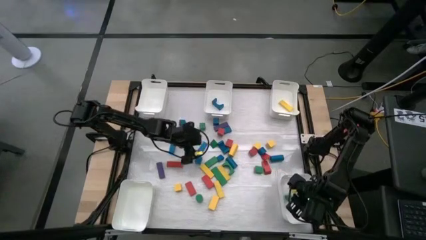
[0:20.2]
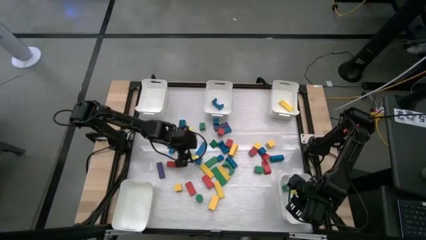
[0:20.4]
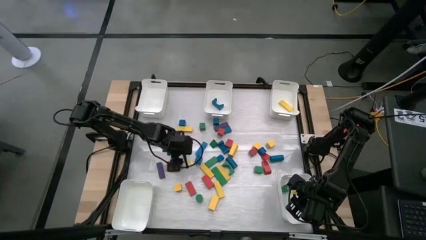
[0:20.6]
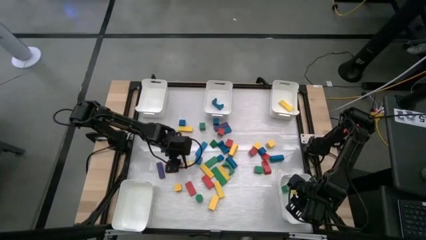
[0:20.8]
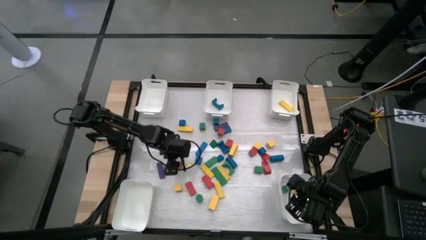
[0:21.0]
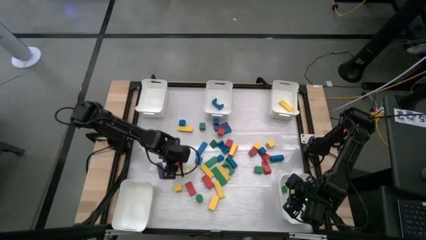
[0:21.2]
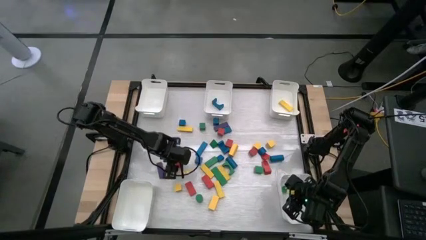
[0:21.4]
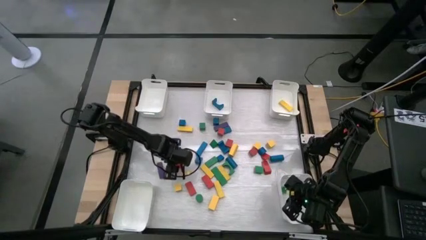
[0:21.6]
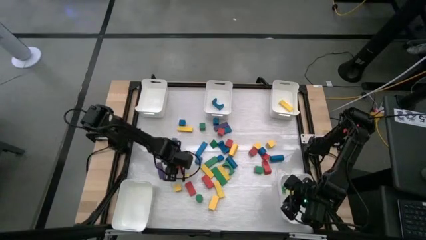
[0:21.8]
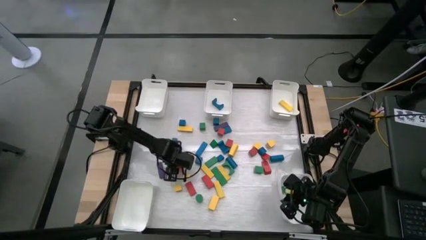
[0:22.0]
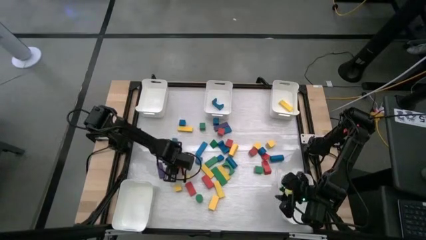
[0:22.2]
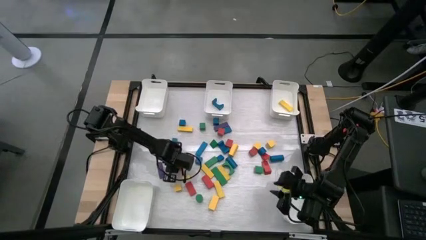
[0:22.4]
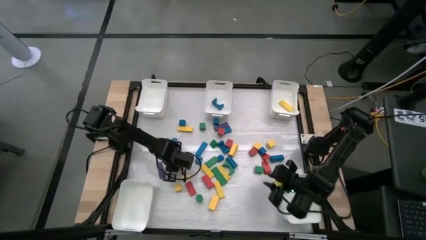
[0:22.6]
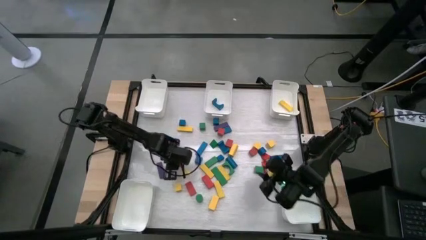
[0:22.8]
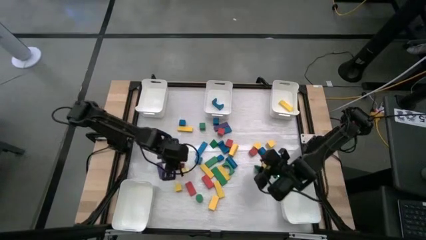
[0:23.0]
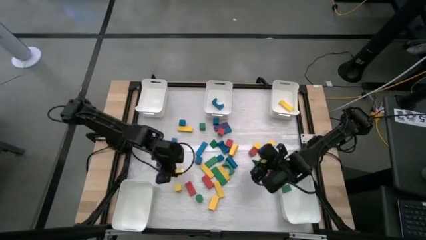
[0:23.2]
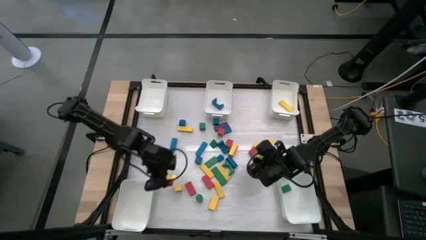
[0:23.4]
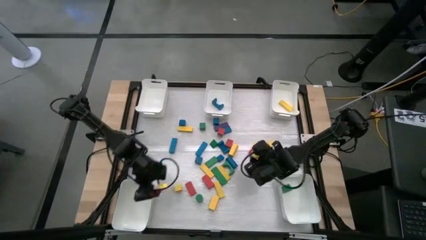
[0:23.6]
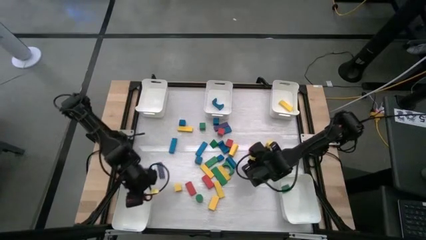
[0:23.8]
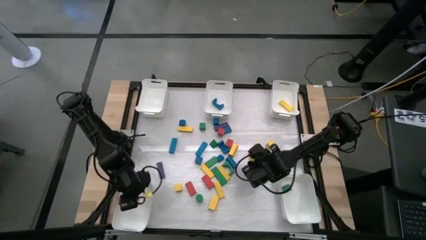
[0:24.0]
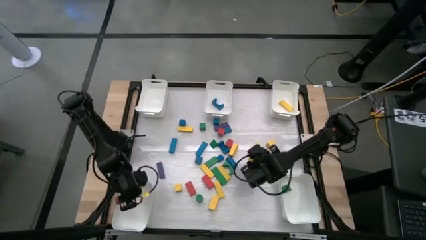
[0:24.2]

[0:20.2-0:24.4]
Task: Sort blocks
Put the red block into the bottom left white bin

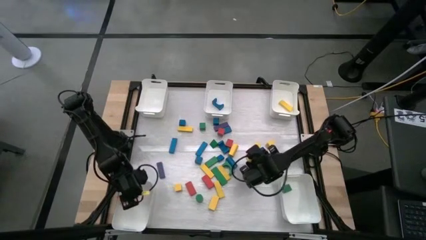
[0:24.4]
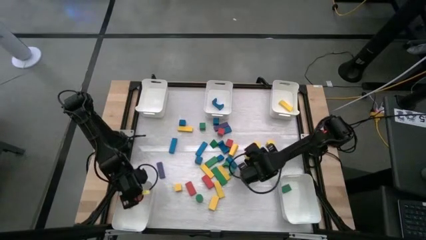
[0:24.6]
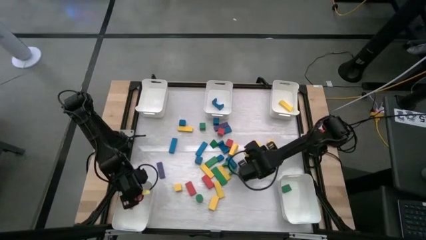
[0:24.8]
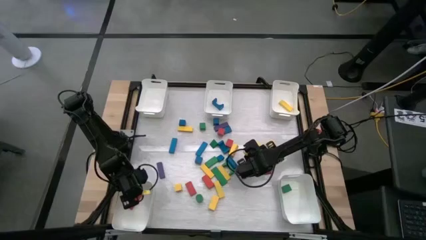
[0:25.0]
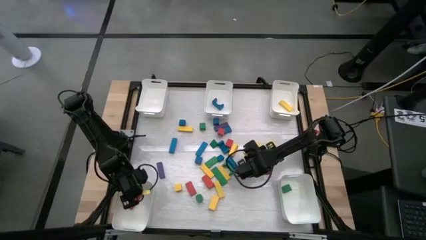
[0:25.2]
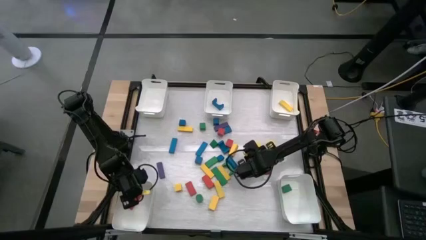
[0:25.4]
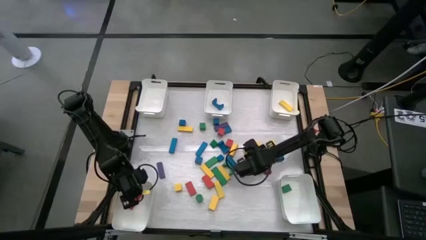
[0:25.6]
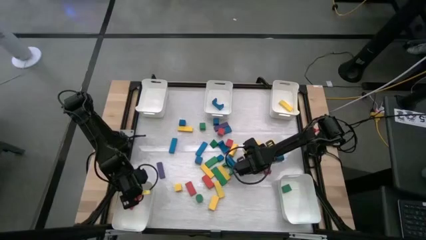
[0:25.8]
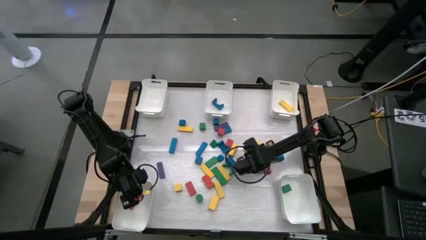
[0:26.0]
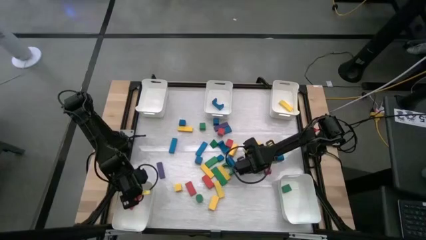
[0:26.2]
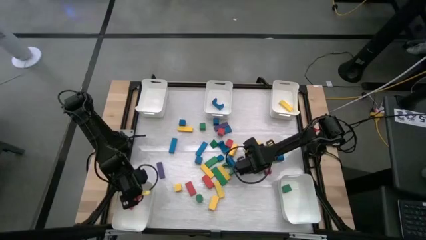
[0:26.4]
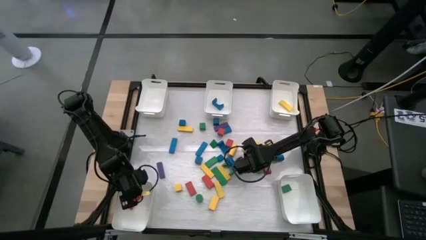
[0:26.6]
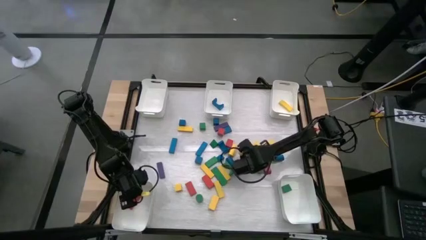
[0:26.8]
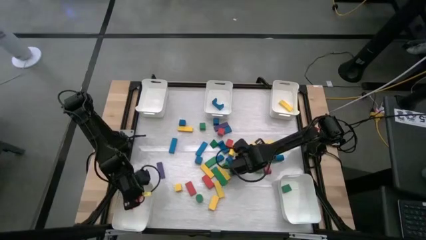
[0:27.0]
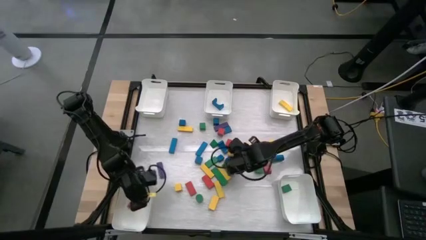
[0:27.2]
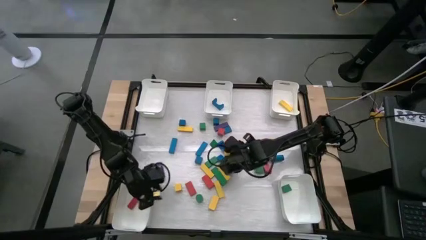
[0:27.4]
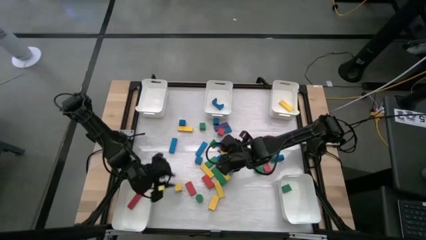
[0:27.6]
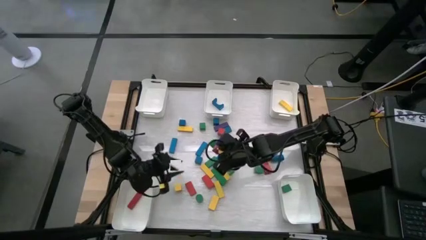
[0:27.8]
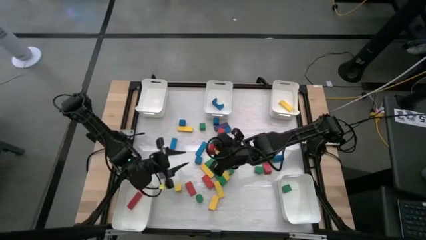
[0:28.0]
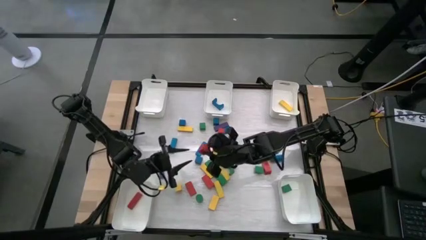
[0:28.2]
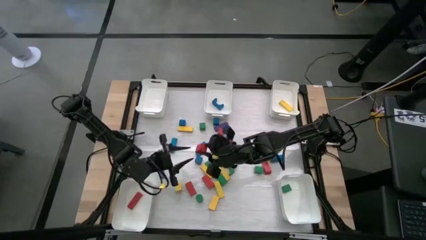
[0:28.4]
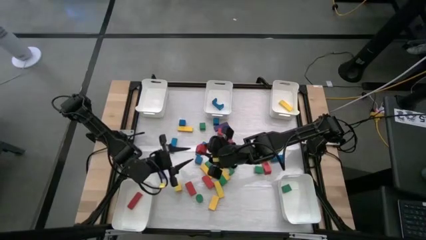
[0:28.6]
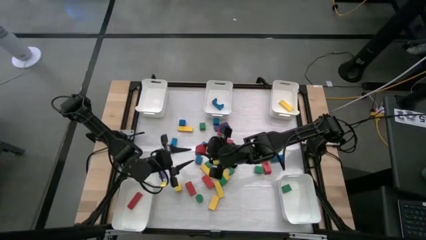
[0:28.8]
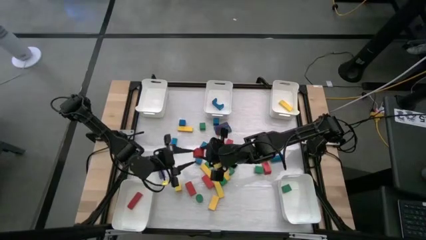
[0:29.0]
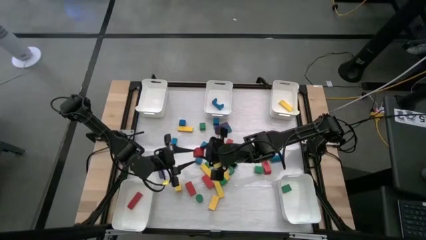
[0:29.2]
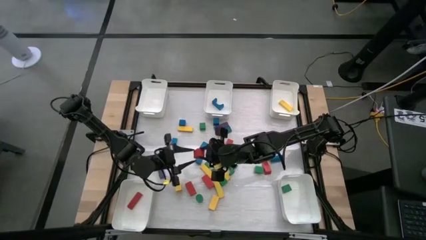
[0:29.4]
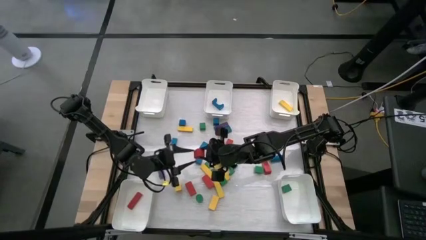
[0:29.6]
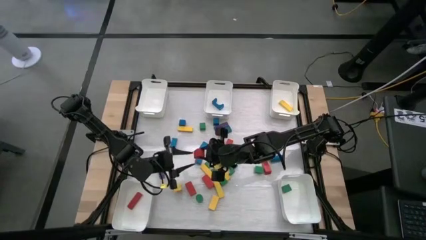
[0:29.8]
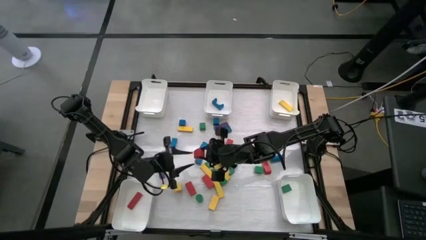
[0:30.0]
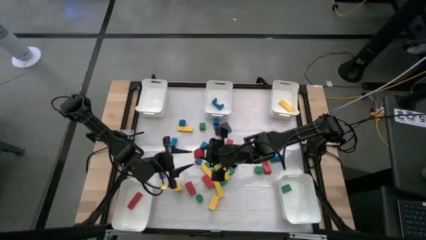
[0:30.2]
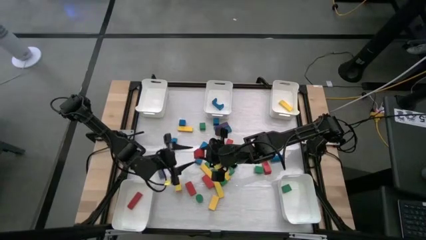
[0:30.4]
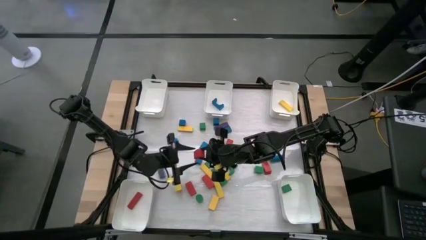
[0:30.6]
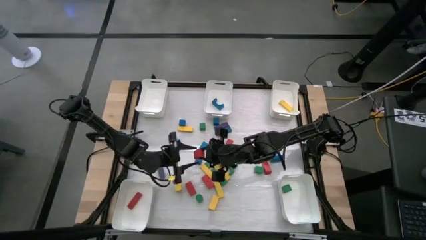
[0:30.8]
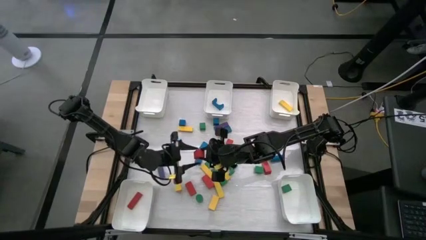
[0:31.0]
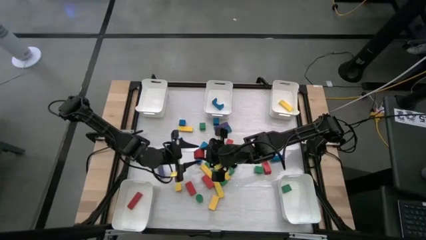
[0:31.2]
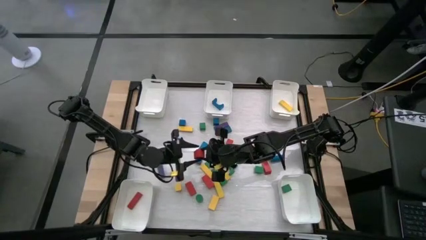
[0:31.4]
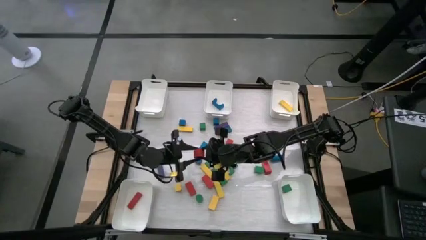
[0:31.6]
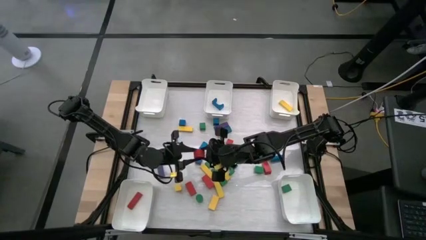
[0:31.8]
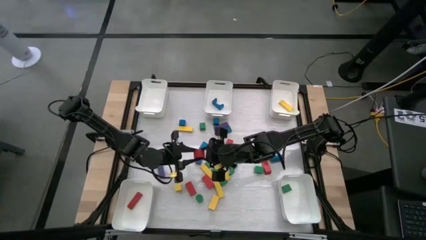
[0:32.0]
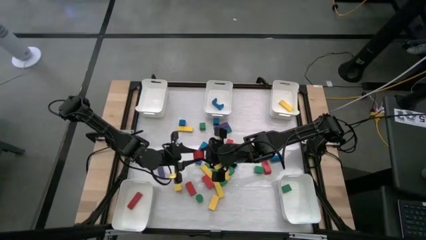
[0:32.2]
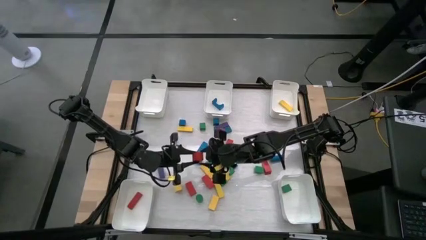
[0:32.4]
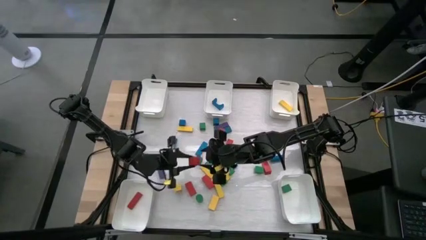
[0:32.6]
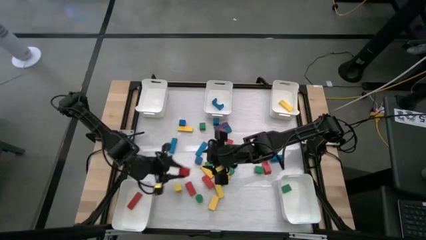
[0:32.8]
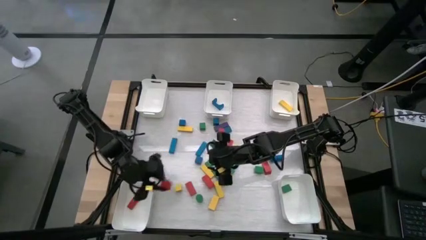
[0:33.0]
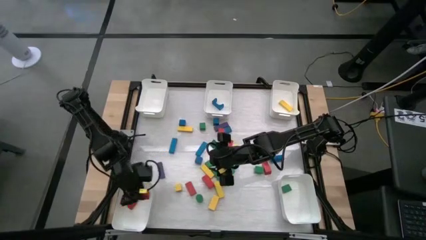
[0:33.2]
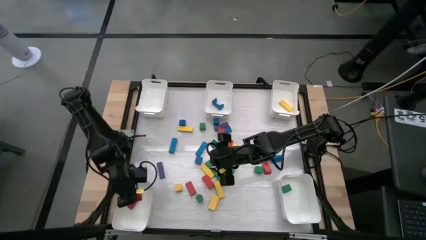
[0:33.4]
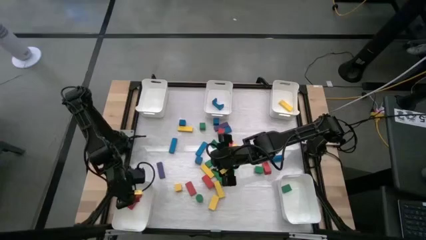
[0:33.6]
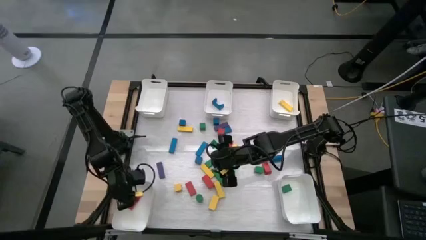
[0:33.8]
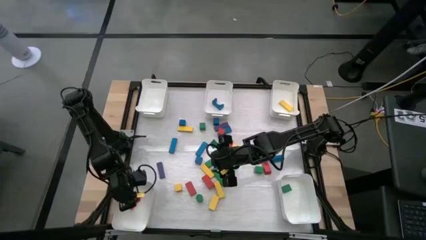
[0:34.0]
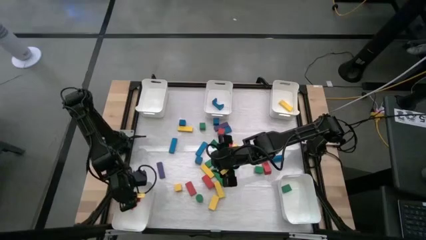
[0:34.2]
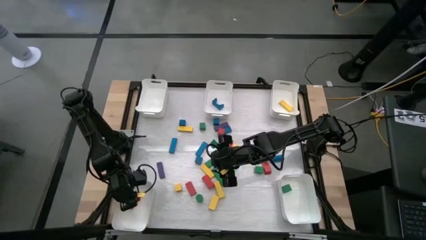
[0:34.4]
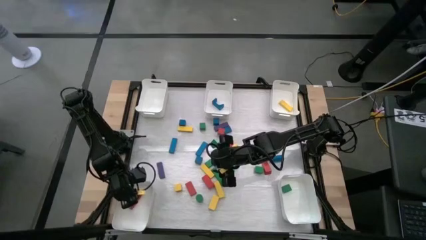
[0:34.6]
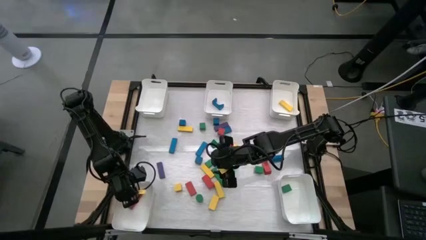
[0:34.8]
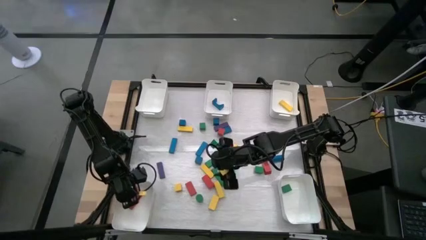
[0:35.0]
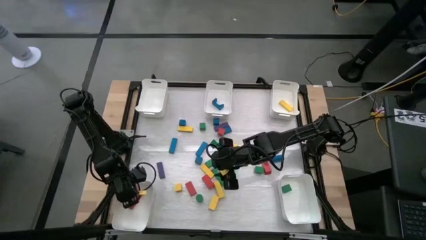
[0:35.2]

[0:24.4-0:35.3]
Put the red block into the bottom left white bin

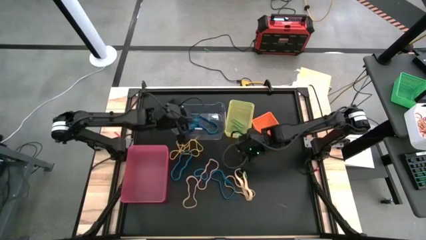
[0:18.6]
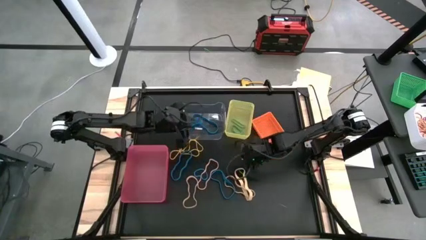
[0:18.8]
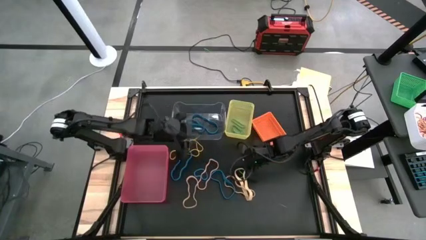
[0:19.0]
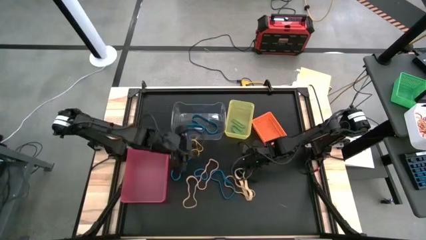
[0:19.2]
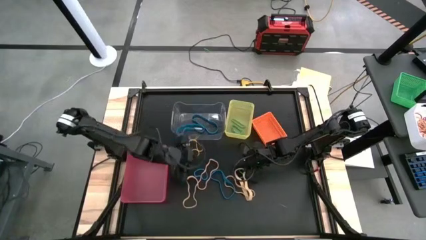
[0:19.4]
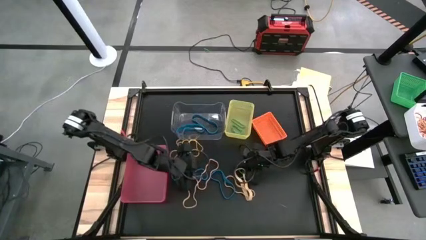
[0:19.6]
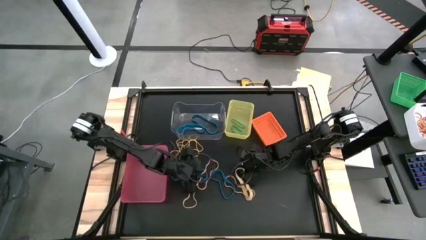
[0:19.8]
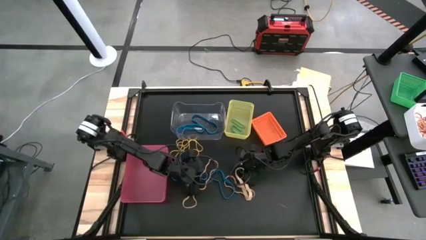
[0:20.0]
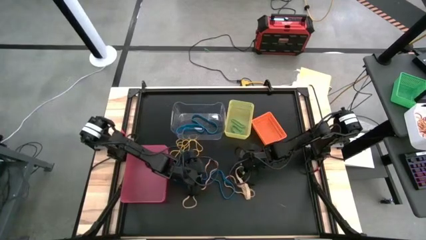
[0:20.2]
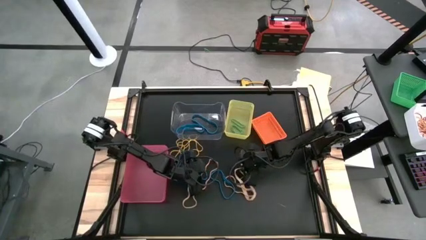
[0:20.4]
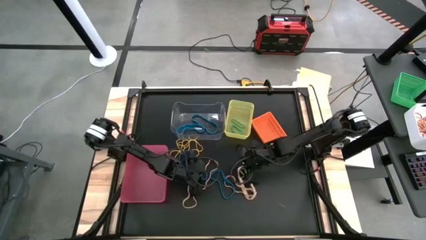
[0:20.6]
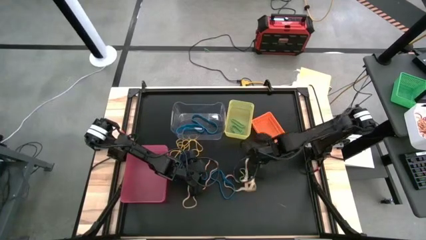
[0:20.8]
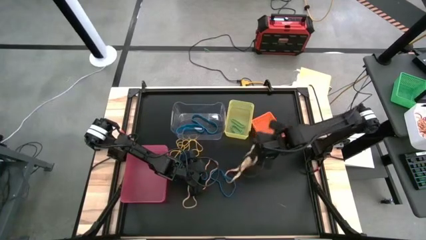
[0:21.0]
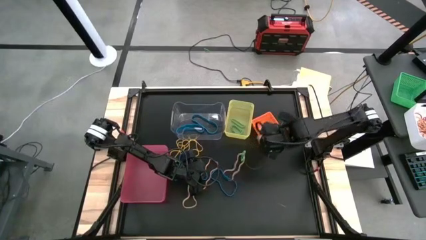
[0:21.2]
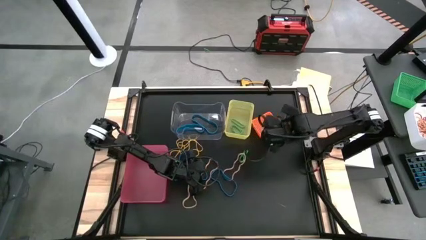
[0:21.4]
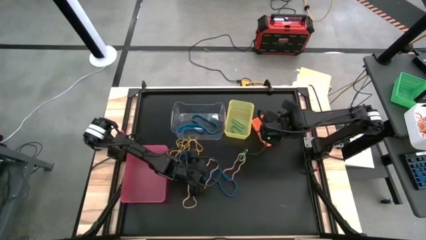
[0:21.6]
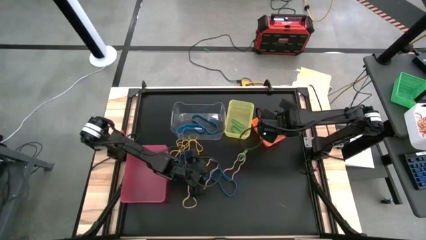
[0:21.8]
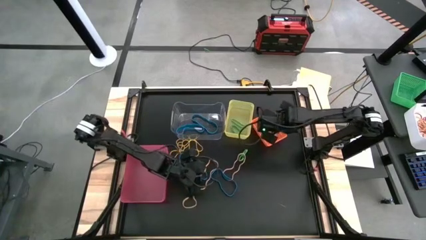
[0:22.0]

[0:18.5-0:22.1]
Task: Sort rubber bands into baskets
Put the orange rubber band into the orange bin
